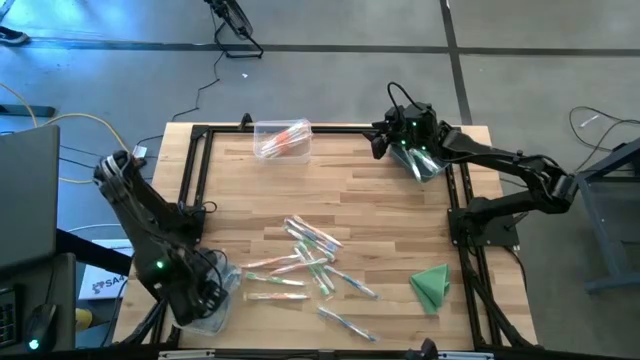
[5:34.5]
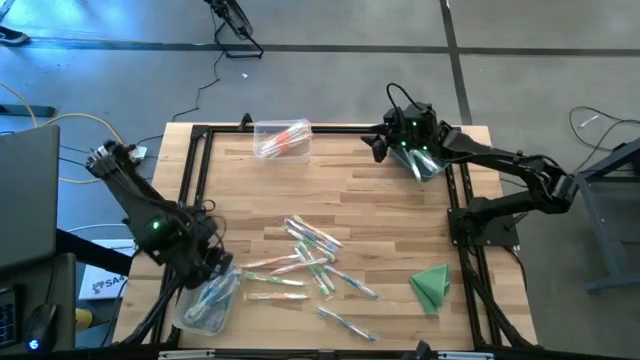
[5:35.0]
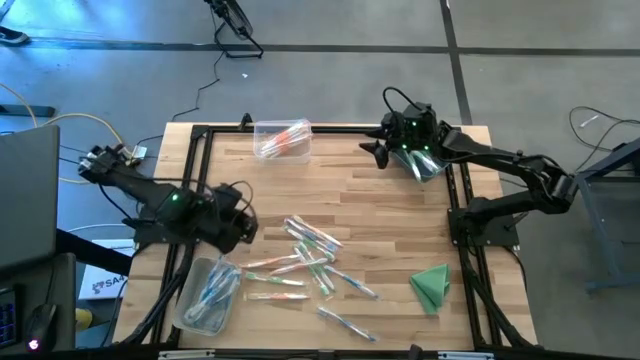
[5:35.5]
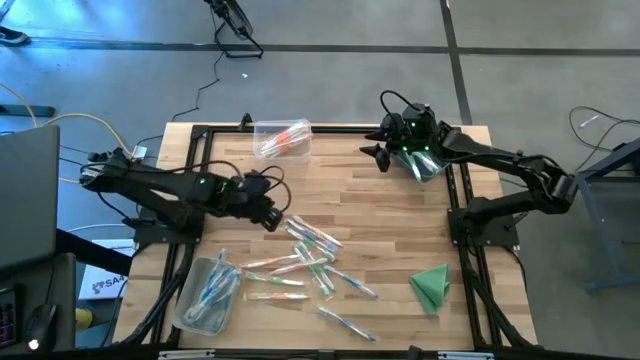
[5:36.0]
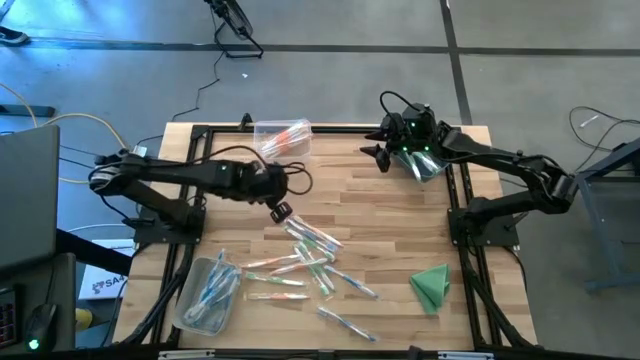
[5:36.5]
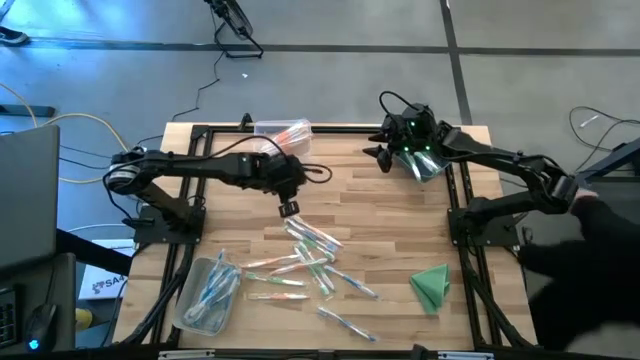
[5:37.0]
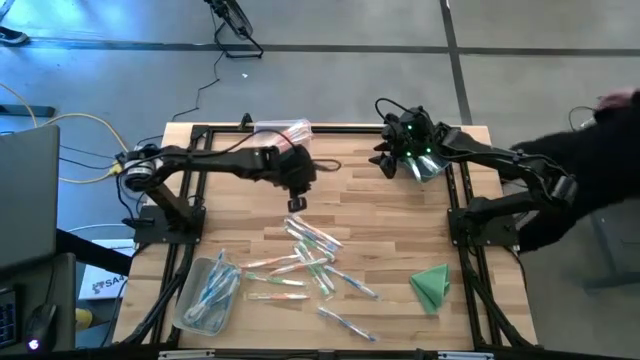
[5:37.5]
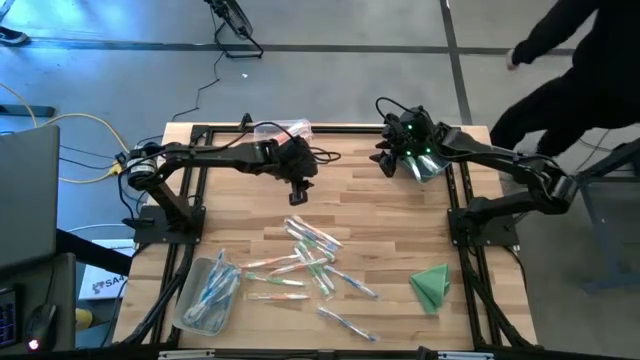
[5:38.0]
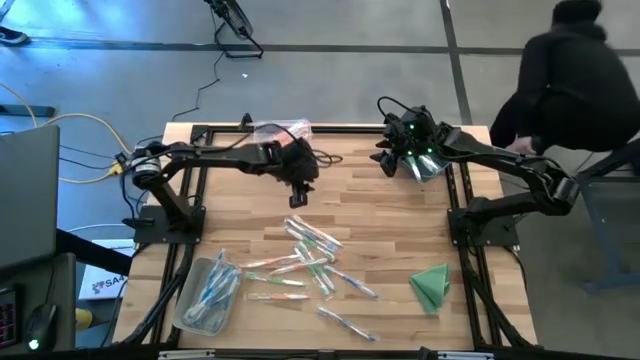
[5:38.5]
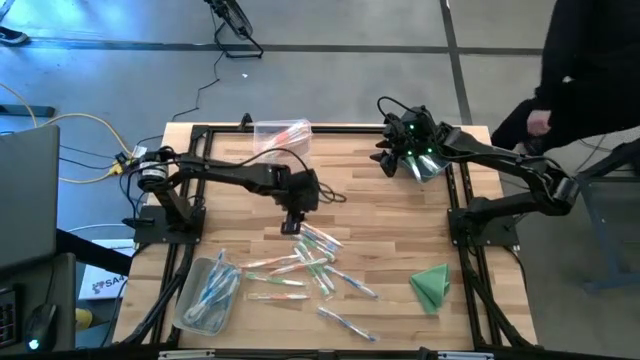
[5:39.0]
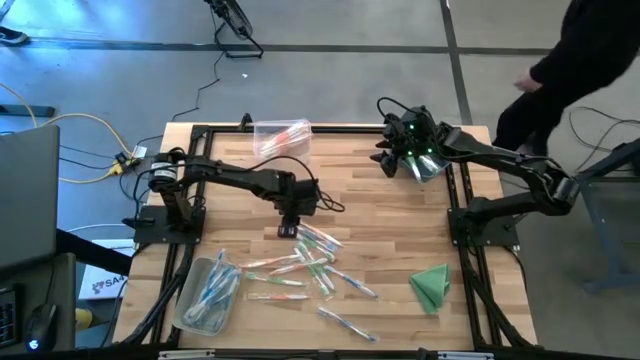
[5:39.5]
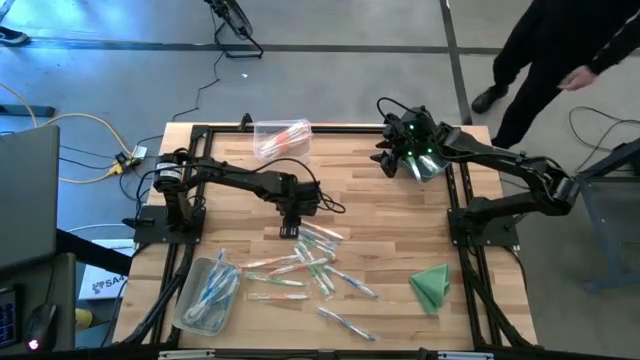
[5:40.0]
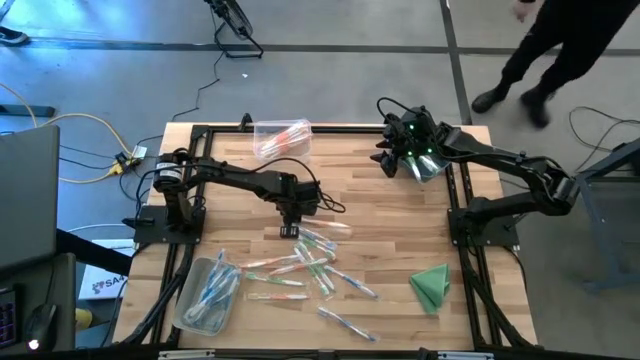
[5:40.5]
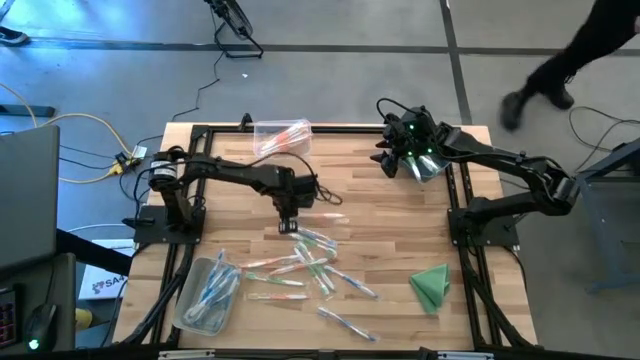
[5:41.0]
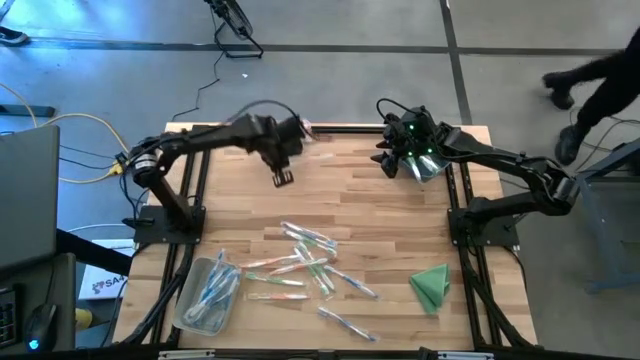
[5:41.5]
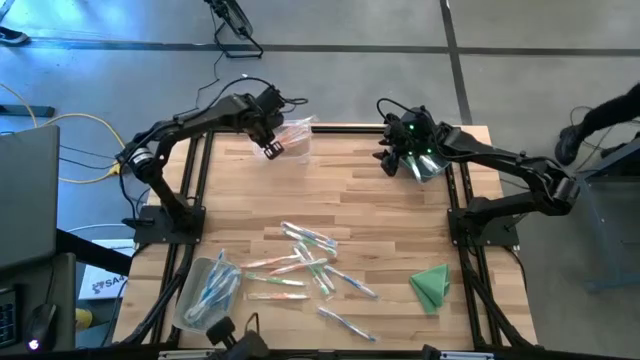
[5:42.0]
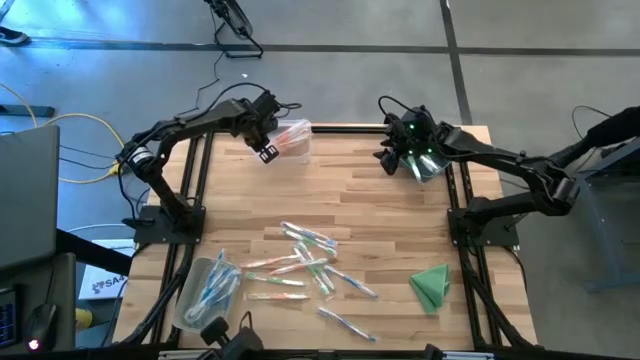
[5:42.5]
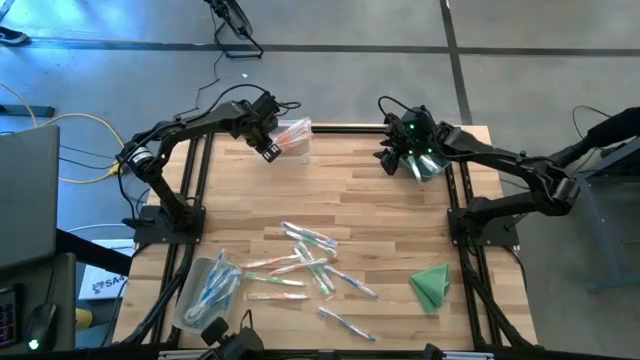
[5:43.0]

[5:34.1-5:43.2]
Task: Pick & Place Toothbrushes
Put the orange toothbrush into the transparent bin

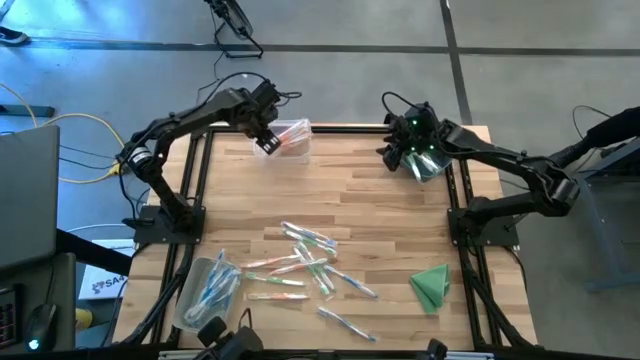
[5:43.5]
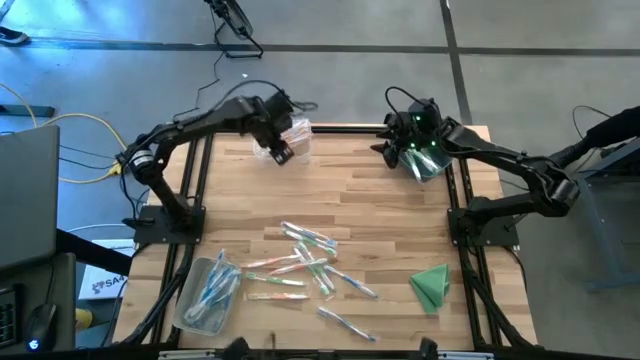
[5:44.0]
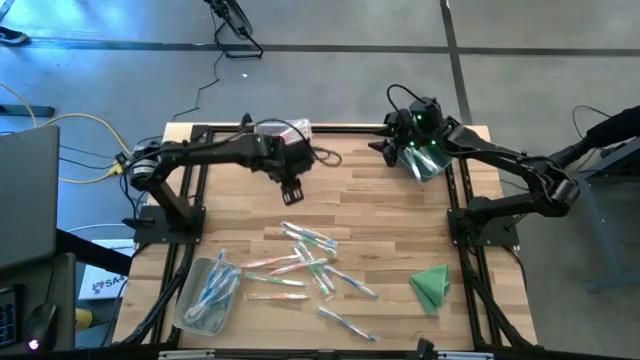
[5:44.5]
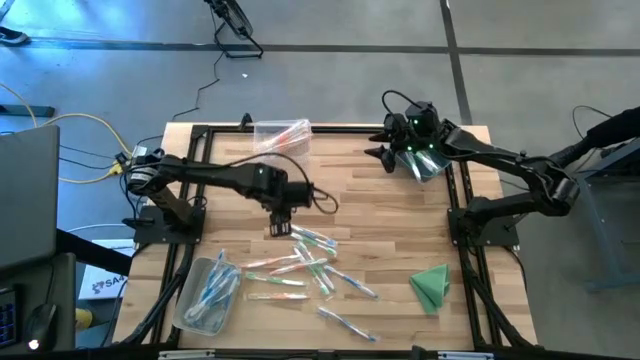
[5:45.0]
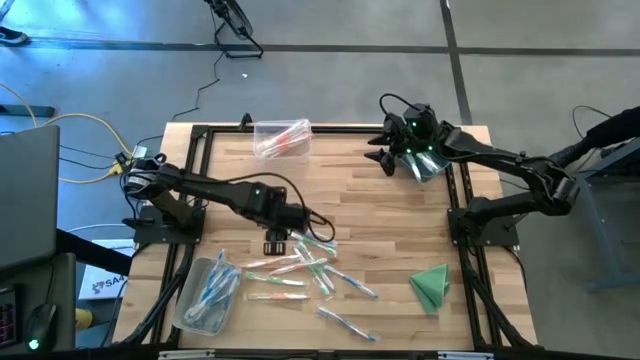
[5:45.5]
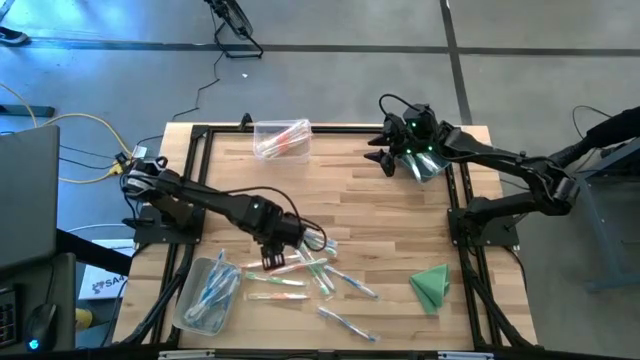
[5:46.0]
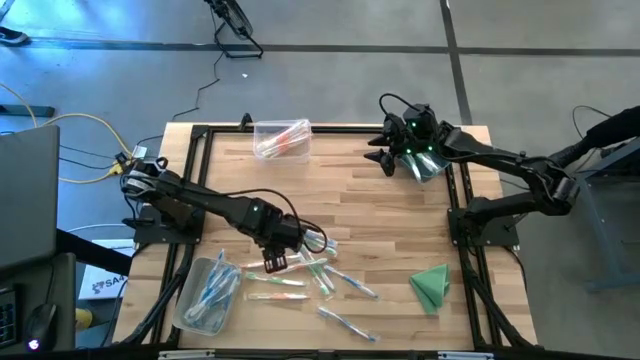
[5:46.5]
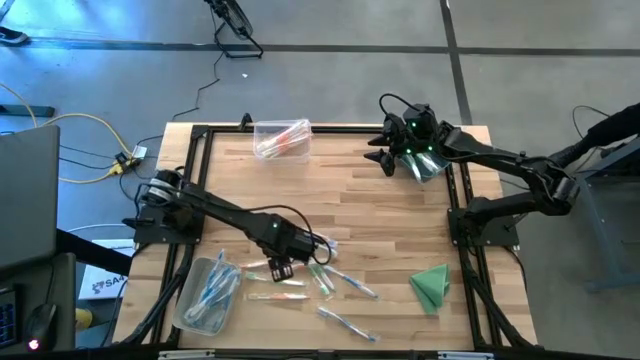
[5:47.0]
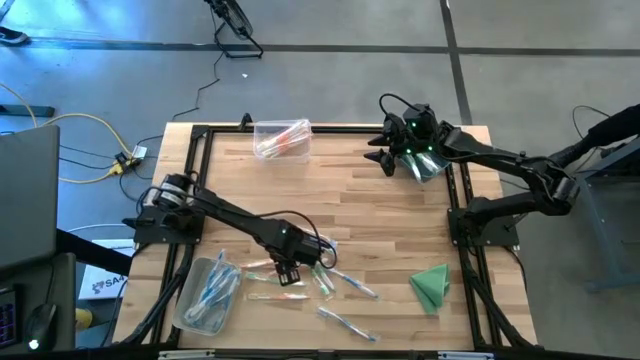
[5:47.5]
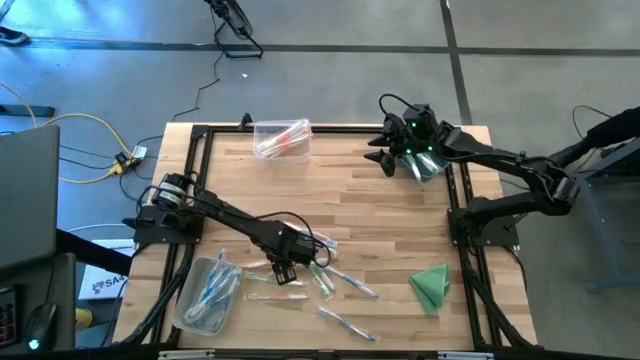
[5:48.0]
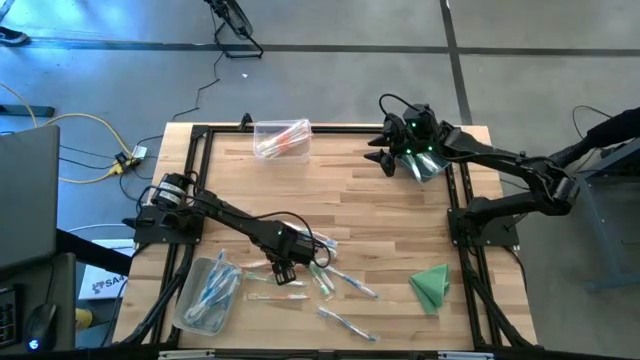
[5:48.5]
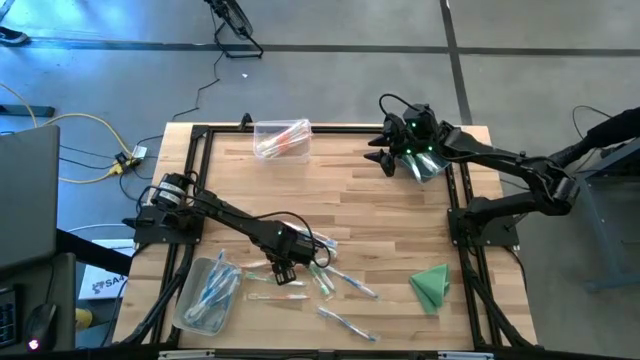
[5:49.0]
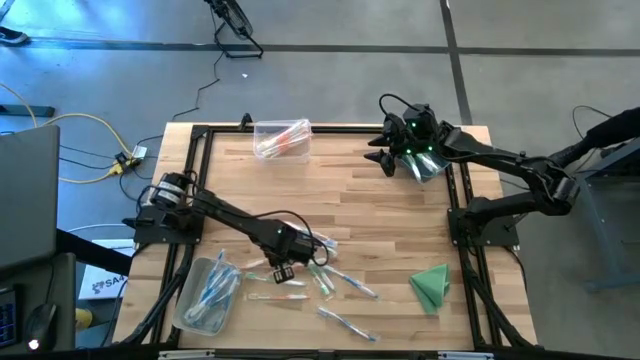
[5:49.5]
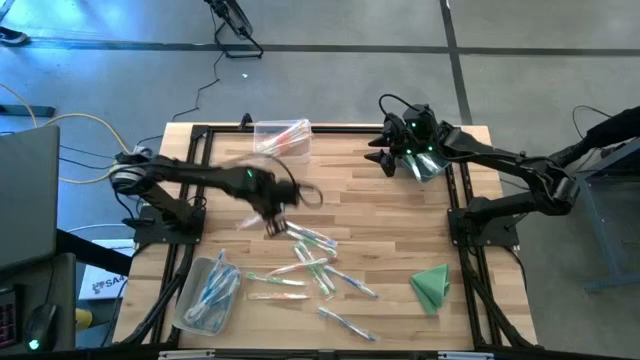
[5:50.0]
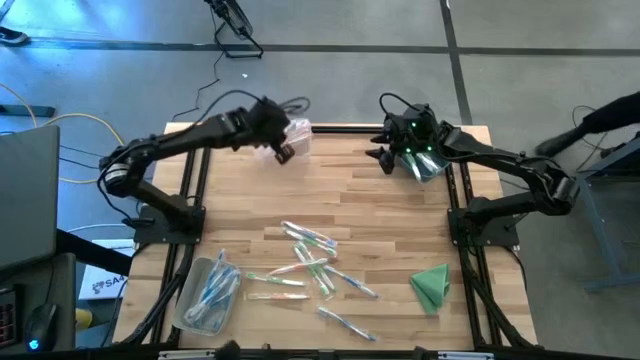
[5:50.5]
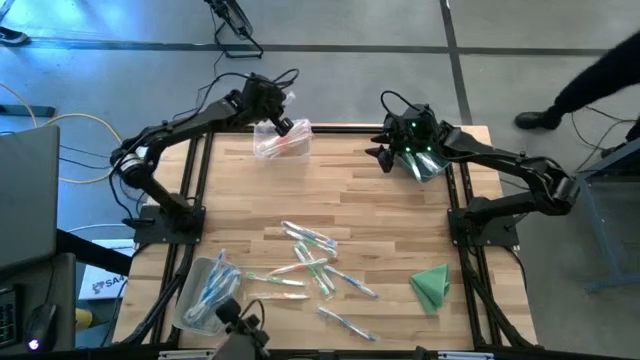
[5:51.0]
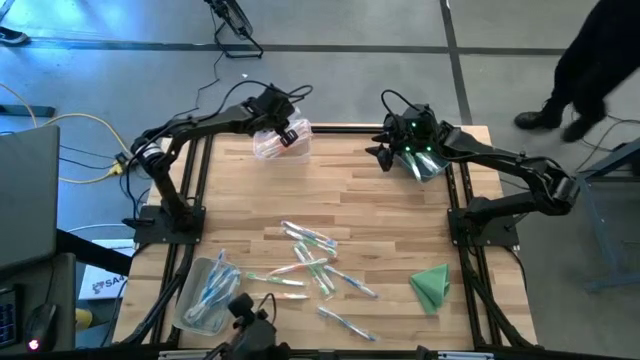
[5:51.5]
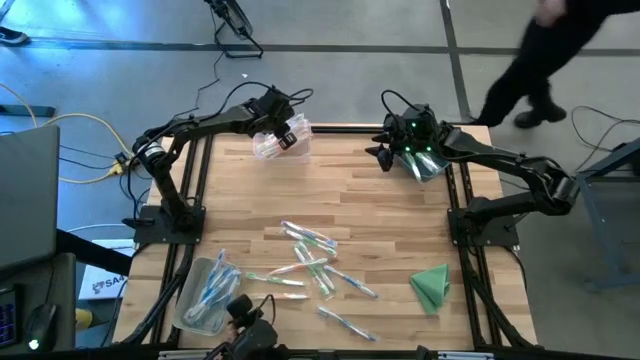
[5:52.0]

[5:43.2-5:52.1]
Put the top orange toothbrush into the transparent bin
